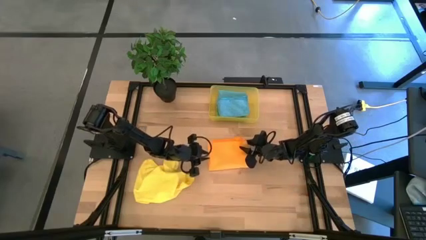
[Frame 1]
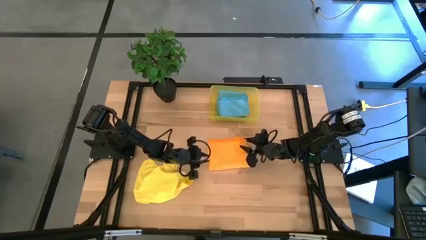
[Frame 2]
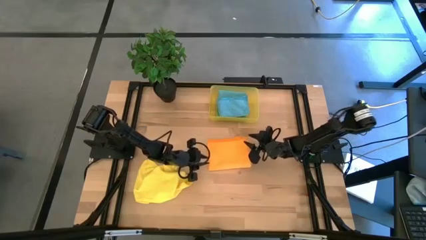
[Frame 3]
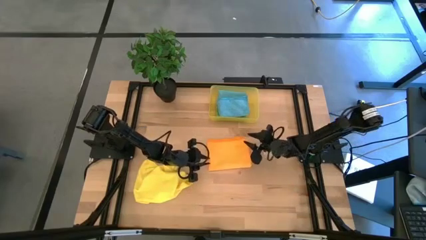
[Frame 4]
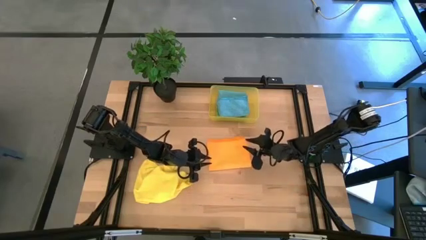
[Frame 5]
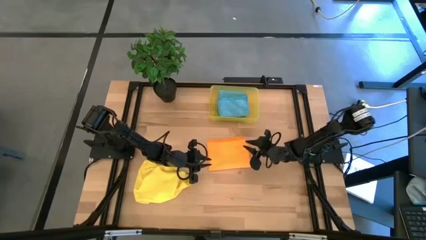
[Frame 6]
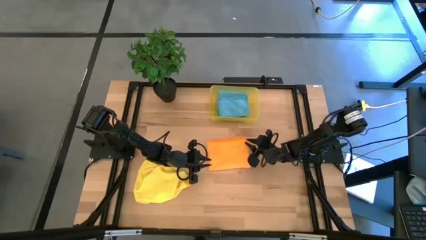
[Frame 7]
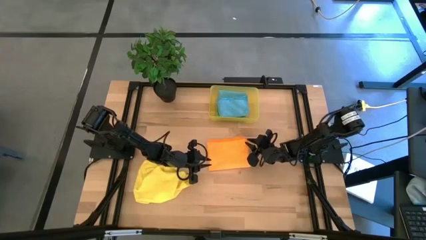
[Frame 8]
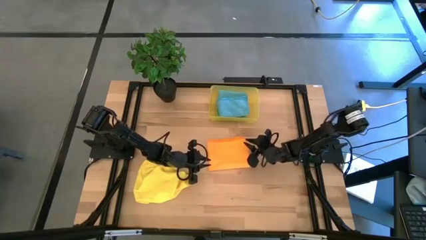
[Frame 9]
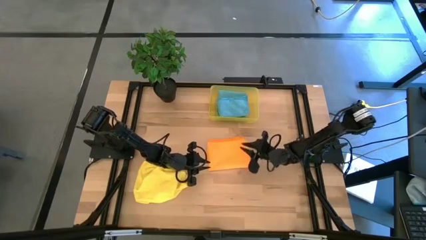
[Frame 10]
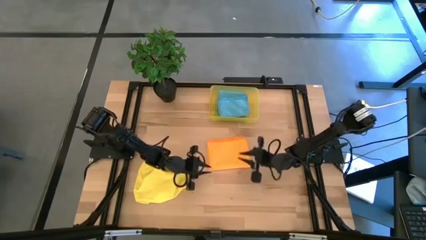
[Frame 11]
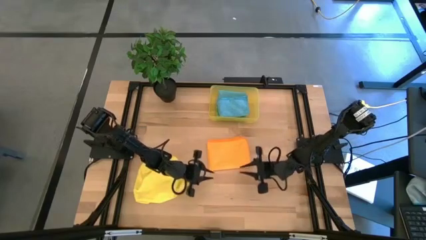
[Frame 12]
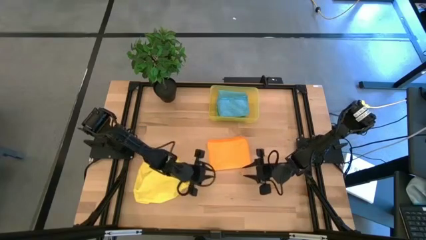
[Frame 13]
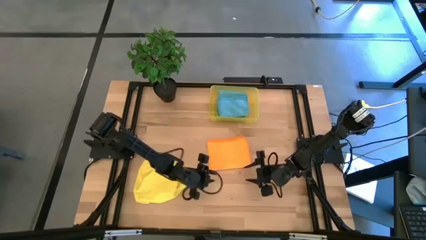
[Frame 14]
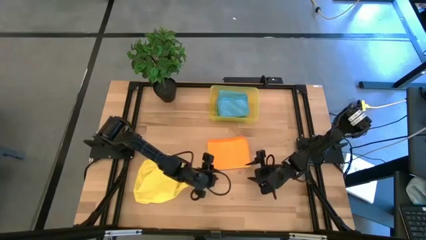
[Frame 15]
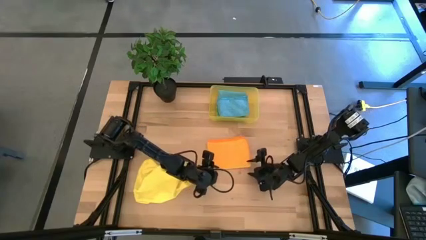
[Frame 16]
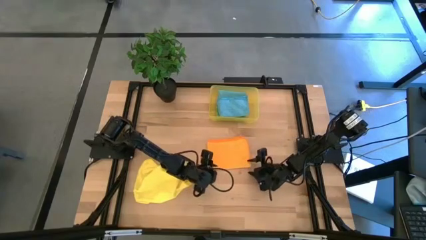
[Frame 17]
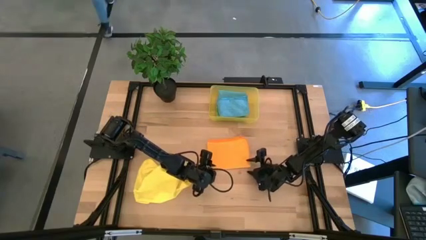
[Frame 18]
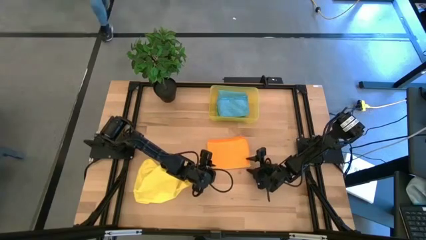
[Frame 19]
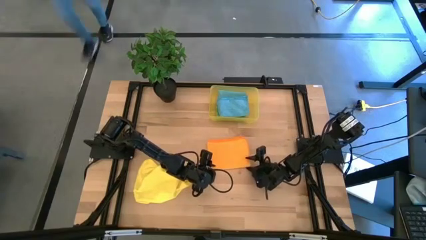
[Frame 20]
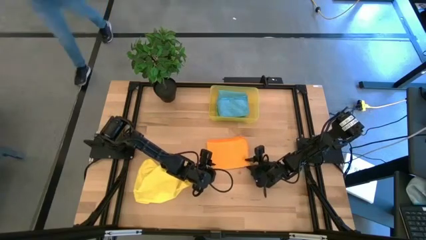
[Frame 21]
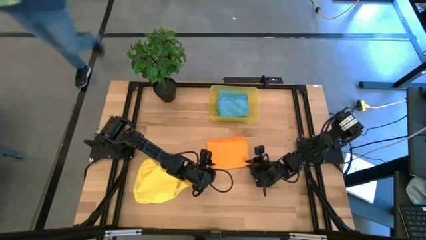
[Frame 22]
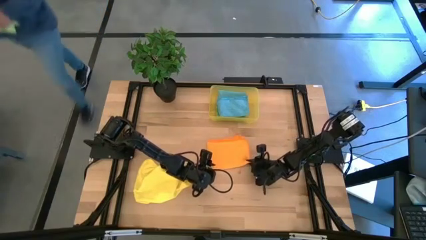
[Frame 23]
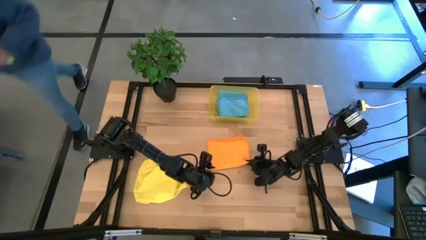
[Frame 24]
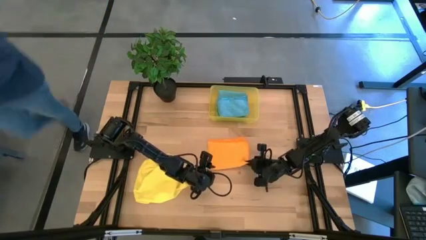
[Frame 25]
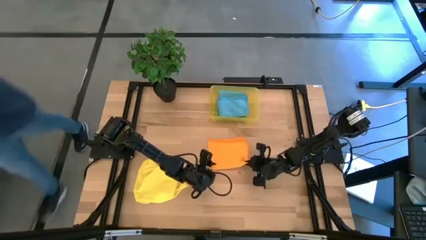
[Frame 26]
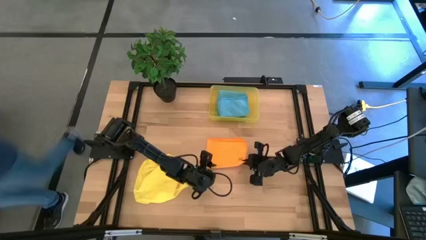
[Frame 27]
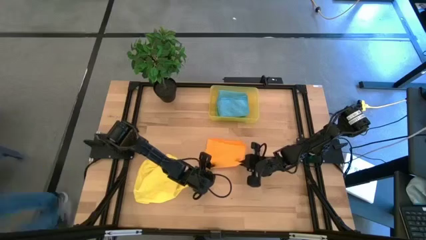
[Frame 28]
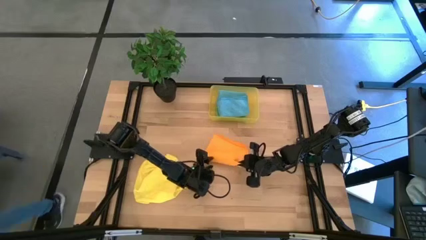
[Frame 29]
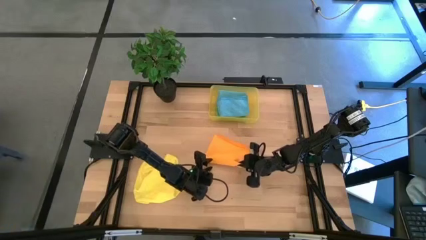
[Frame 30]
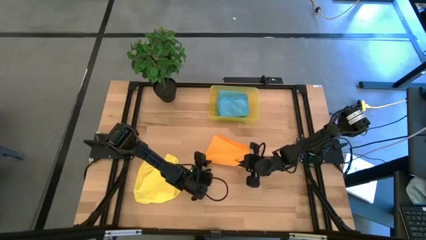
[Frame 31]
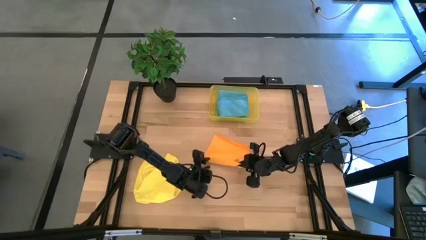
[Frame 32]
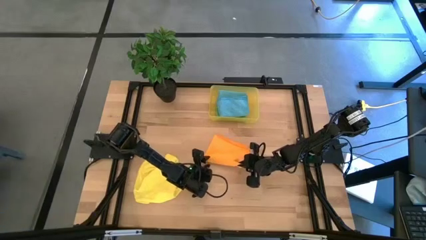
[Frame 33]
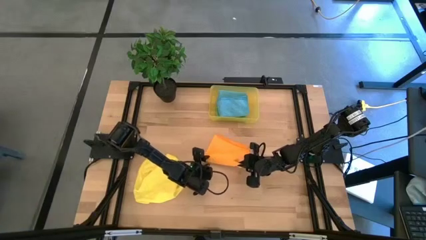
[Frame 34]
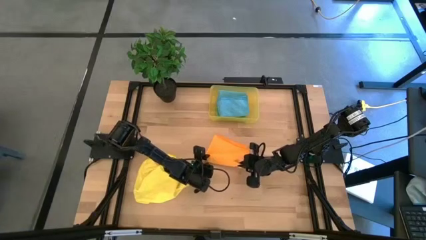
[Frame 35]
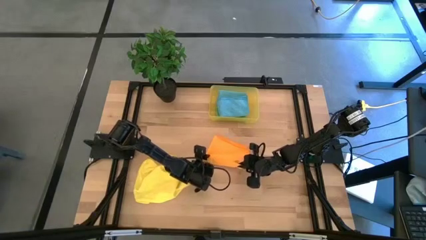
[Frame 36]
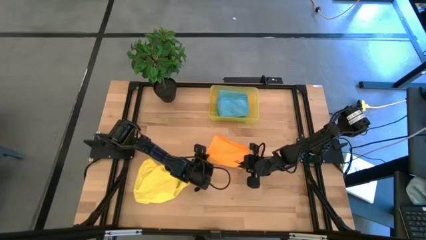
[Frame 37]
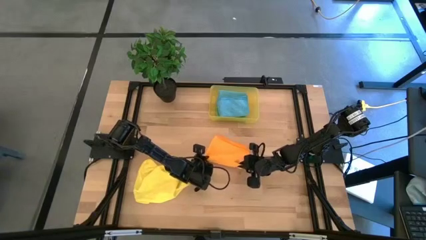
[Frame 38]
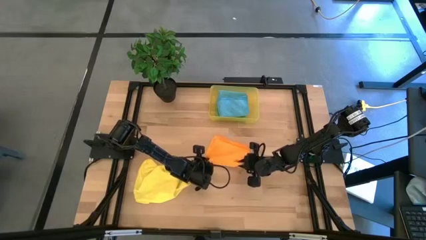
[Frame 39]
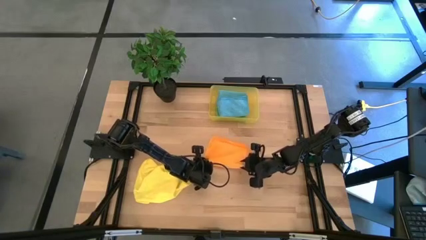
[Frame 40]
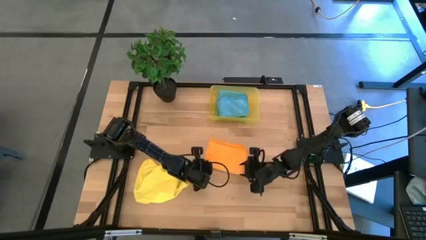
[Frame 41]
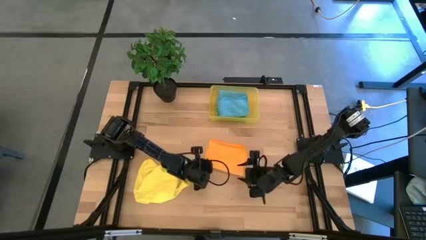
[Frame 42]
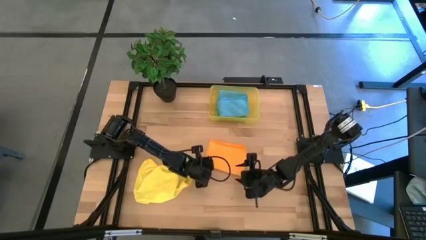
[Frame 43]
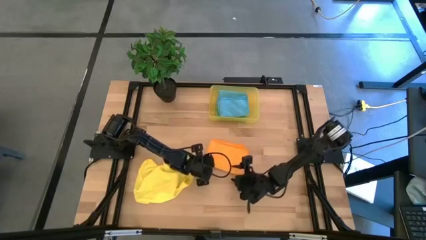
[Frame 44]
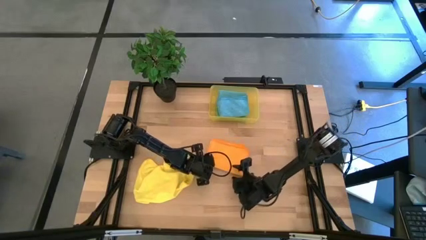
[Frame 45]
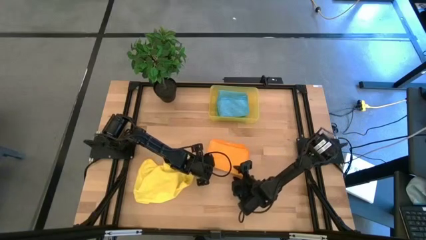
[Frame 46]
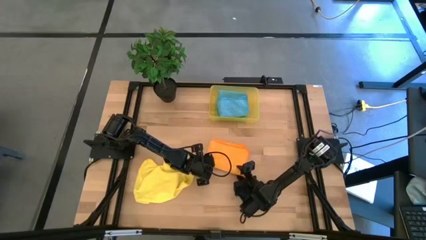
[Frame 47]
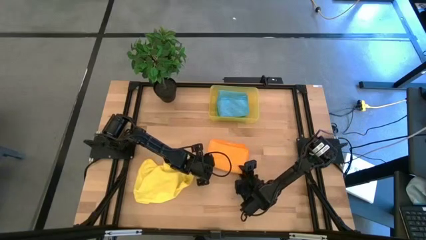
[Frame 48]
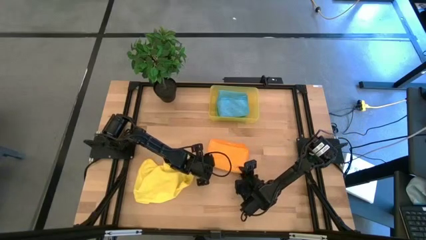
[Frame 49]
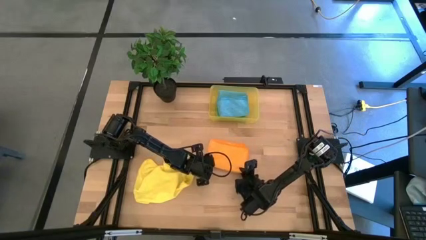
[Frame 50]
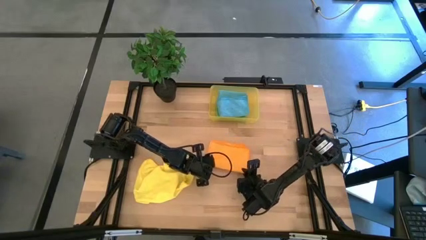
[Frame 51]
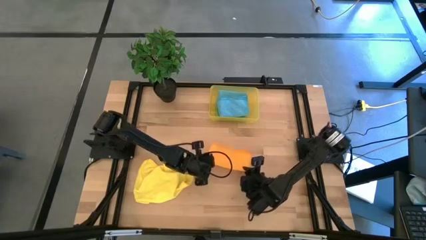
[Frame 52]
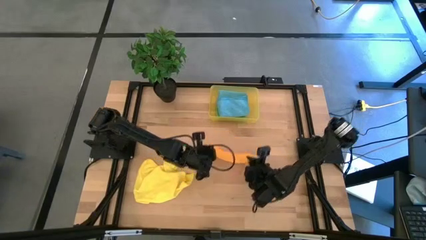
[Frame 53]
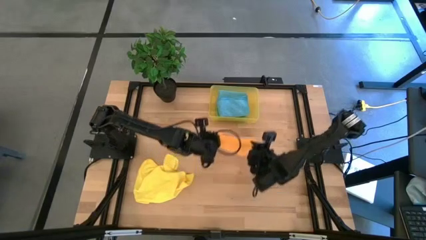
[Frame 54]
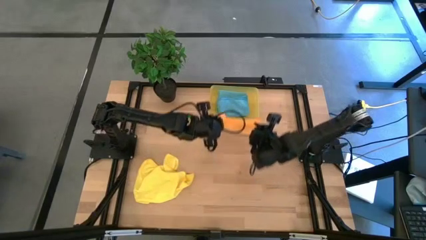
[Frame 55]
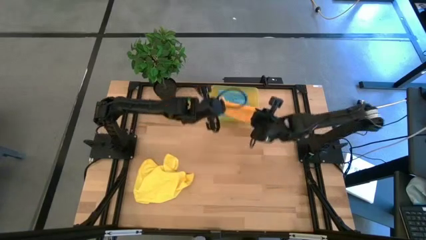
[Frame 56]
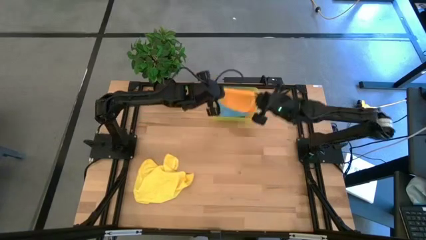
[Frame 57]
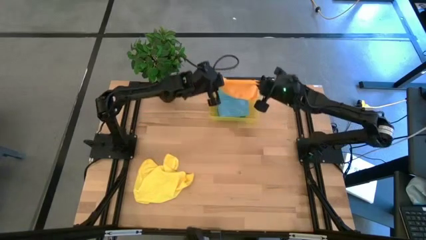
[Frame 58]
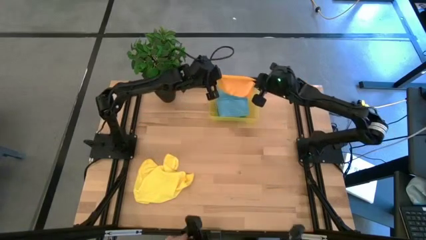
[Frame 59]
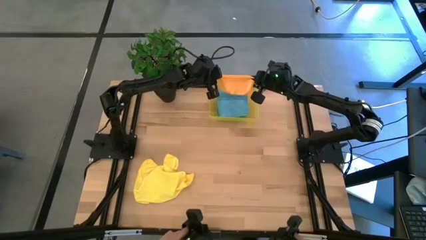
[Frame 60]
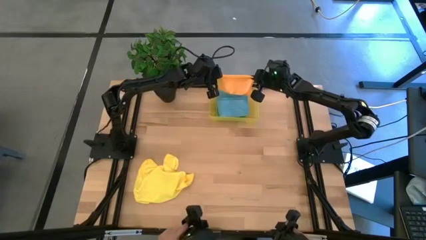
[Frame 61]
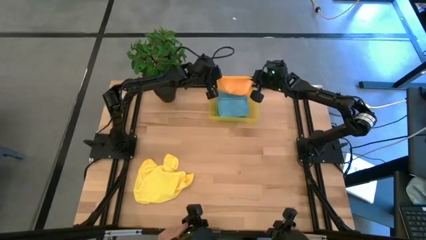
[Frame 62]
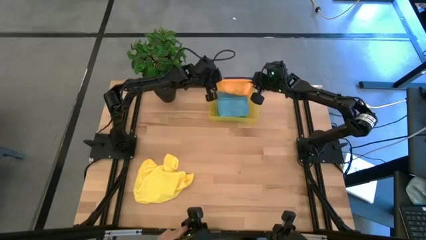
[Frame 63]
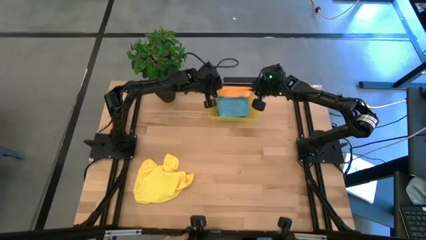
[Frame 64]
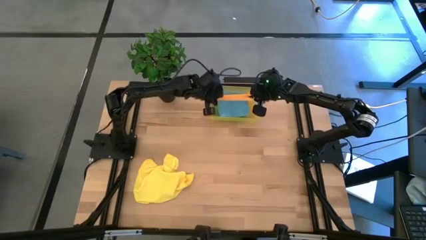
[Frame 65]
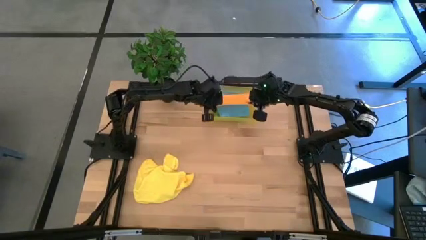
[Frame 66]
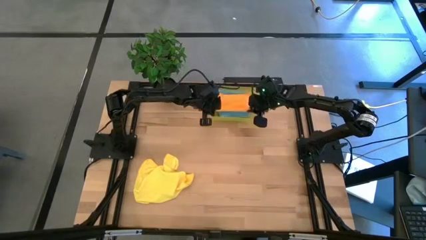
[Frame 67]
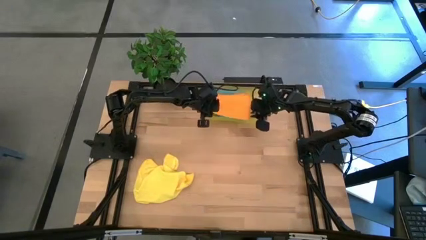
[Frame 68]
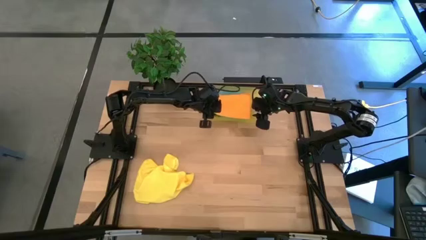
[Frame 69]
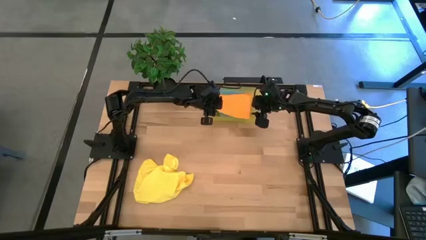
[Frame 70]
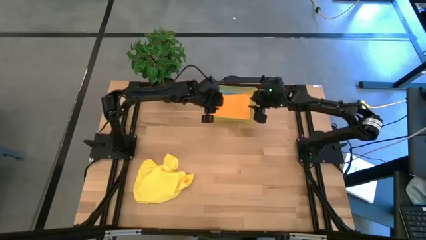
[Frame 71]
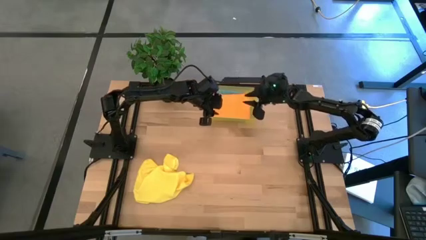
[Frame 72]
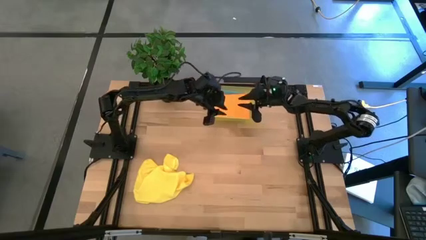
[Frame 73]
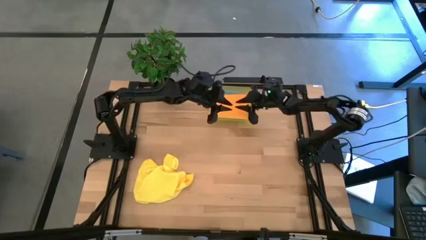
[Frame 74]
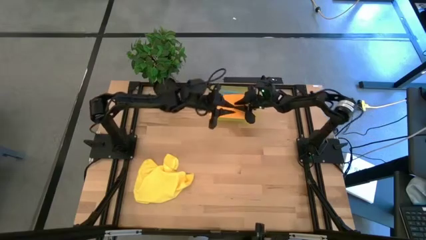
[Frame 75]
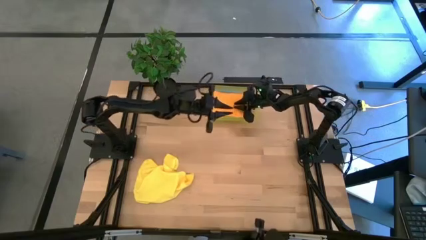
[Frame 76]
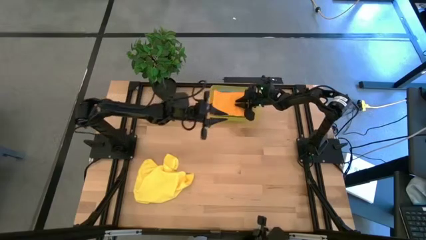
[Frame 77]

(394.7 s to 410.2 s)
Task: Fold microfiber towels
Put the folded orange microfiber towel into the yellow bin
